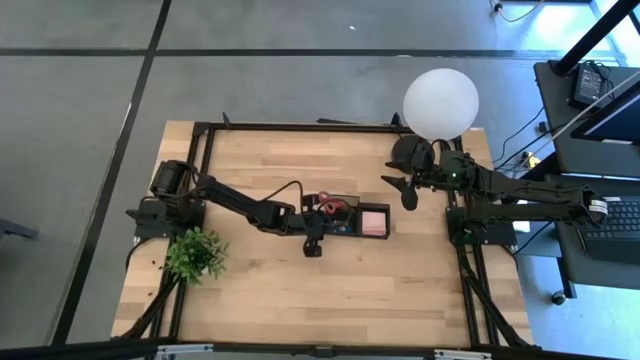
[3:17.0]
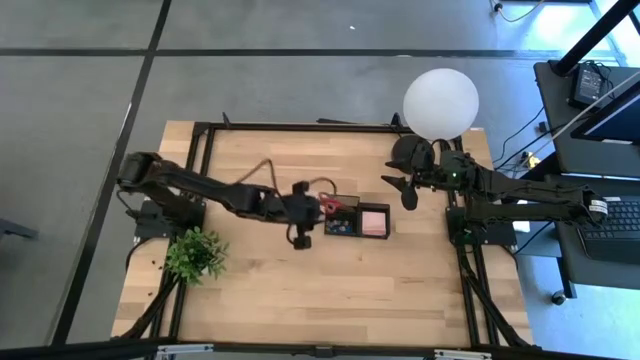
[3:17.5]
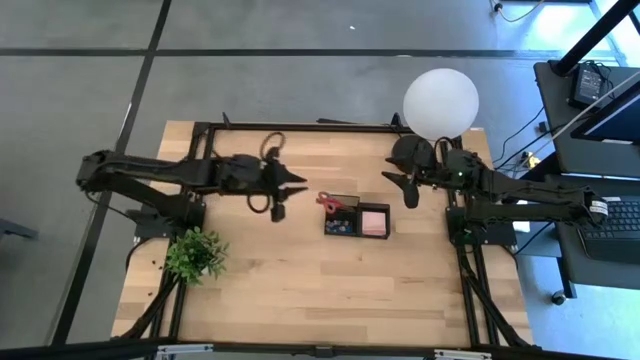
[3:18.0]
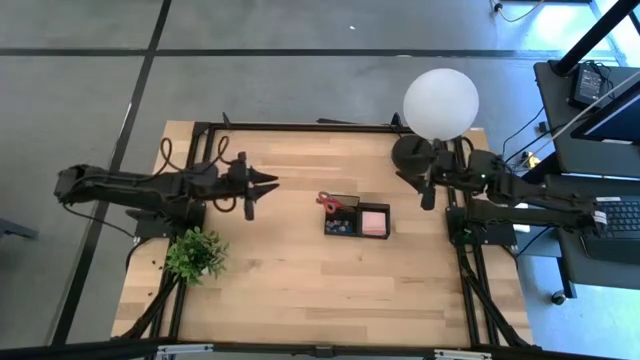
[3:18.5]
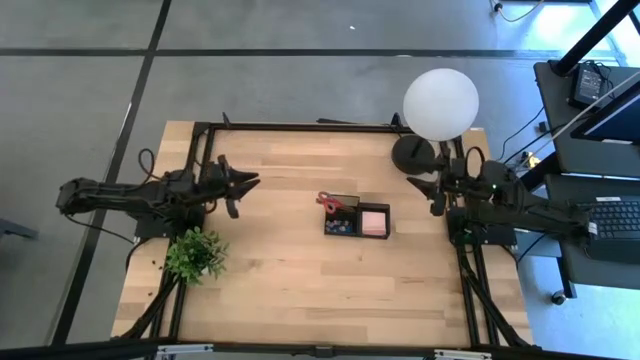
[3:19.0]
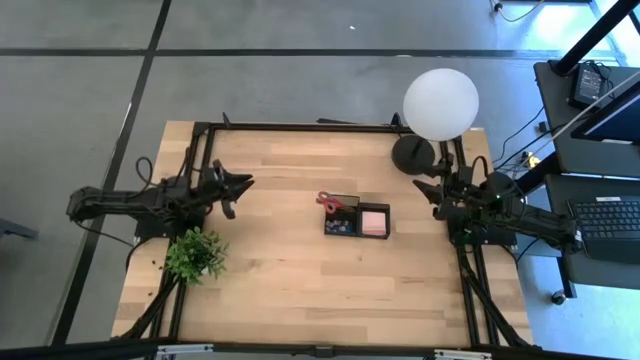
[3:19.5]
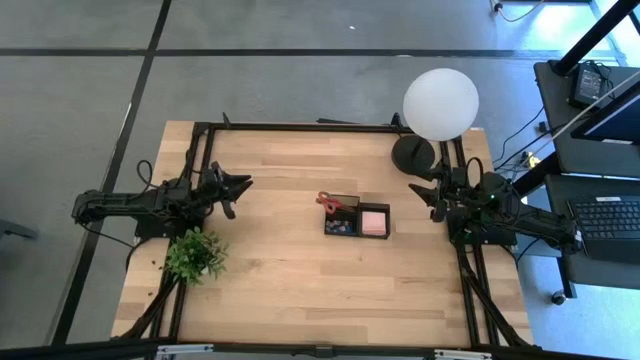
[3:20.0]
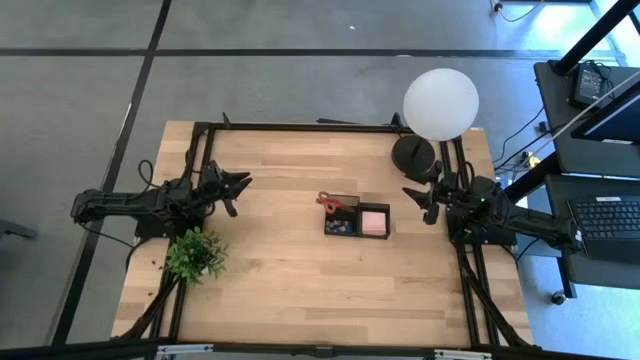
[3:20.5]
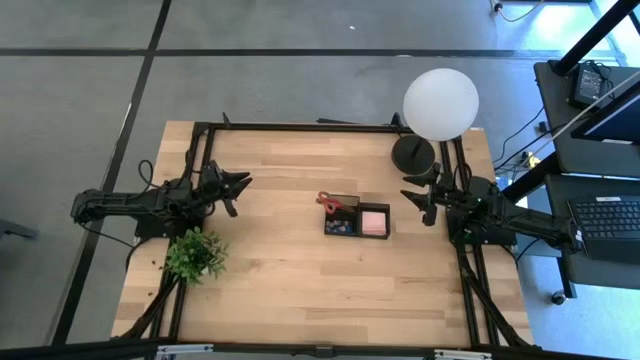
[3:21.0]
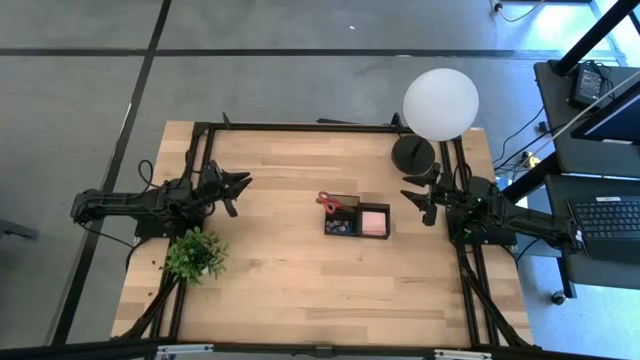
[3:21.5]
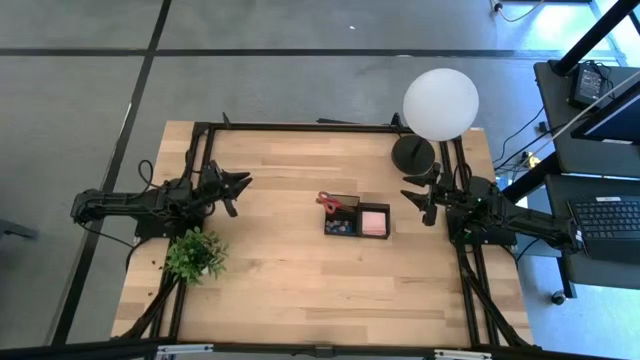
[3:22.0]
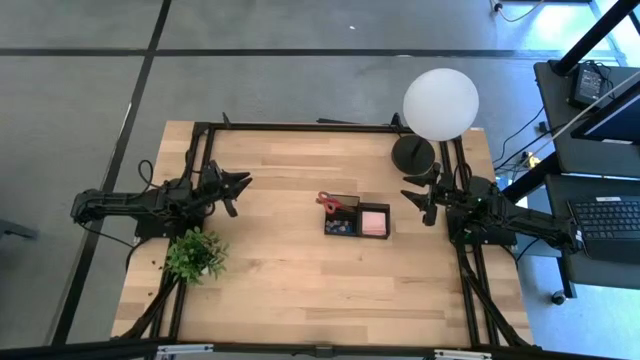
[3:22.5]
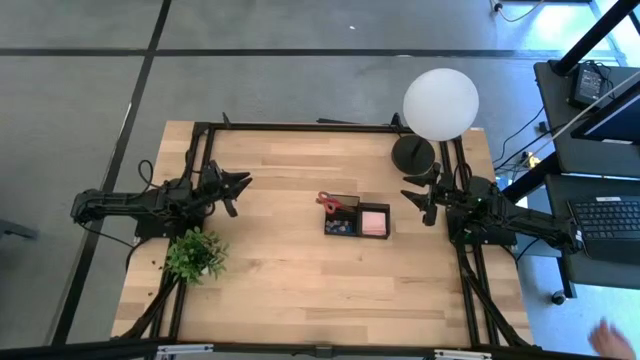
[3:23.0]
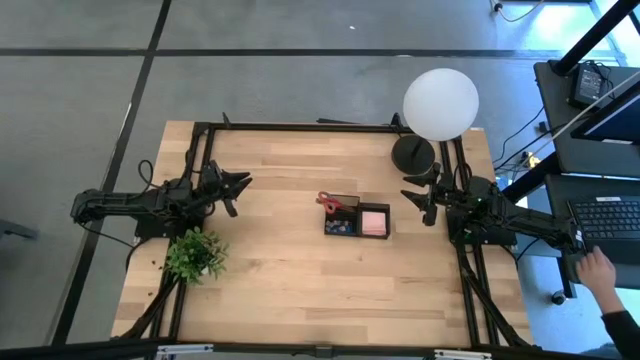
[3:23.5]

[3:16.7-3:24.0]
Task: Pick and place office supplies into organizer
Return to Home Position

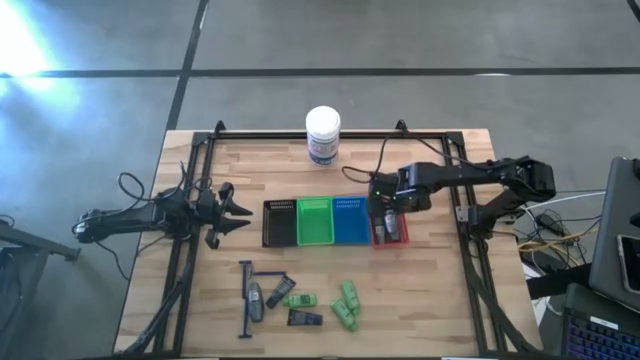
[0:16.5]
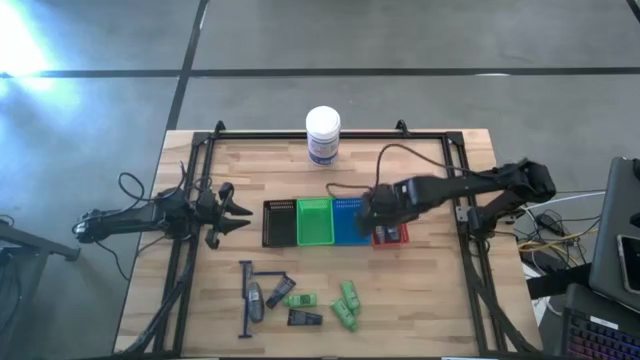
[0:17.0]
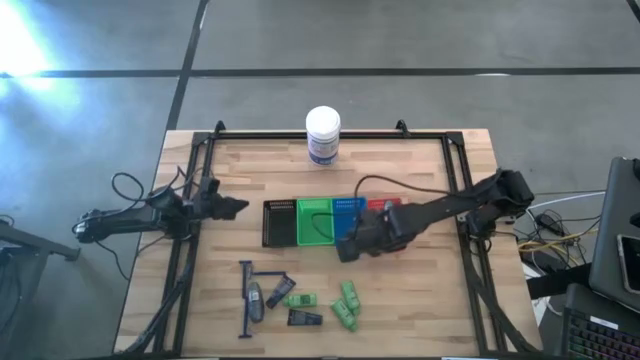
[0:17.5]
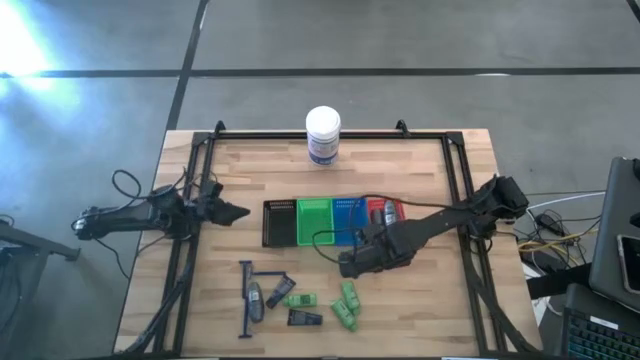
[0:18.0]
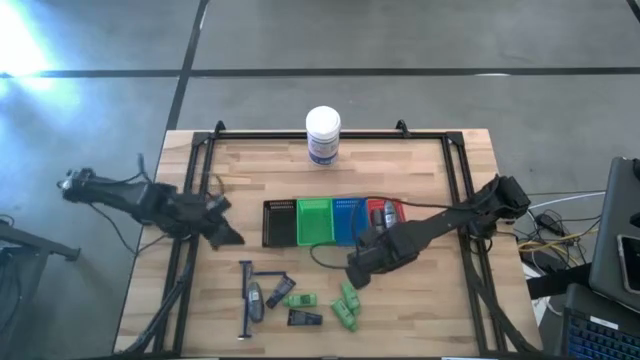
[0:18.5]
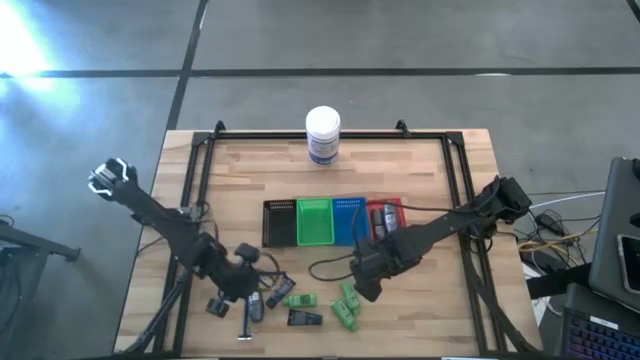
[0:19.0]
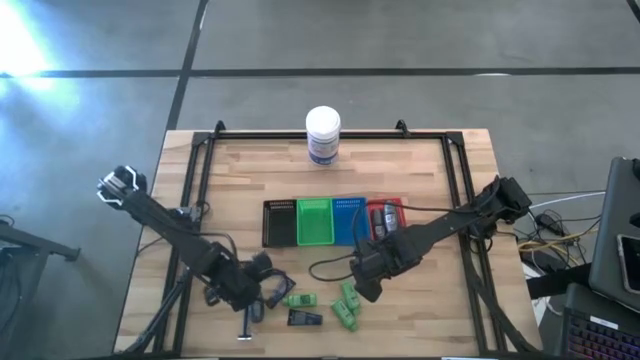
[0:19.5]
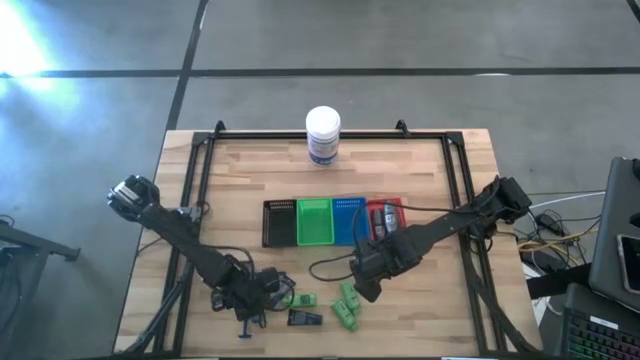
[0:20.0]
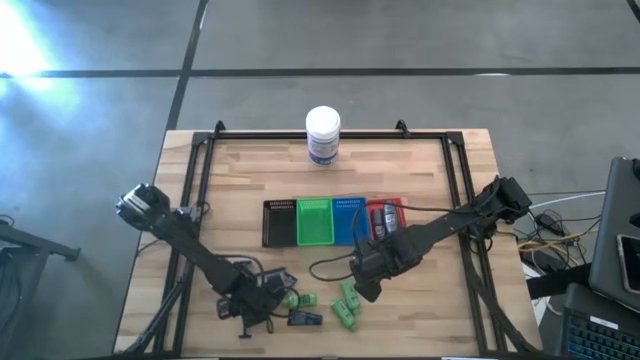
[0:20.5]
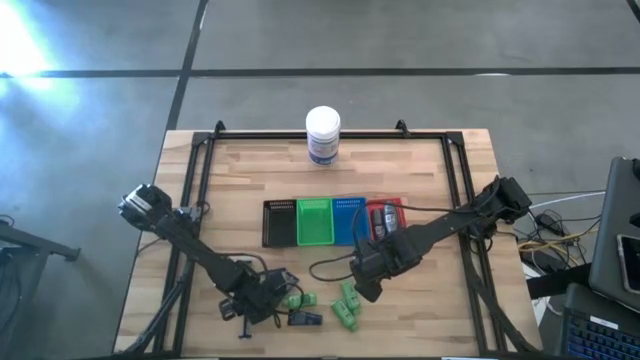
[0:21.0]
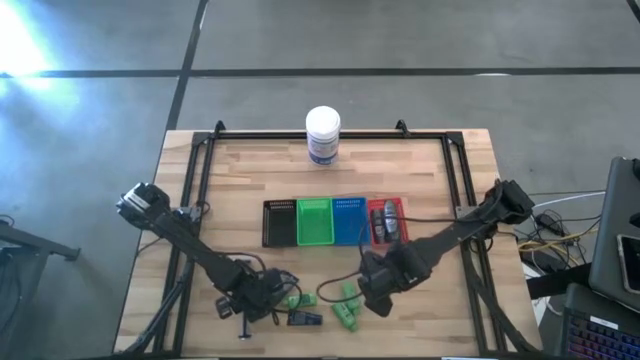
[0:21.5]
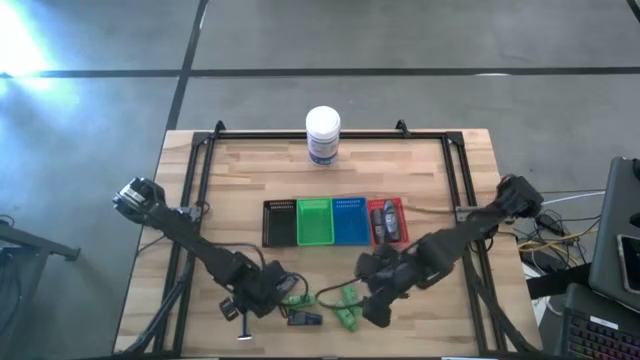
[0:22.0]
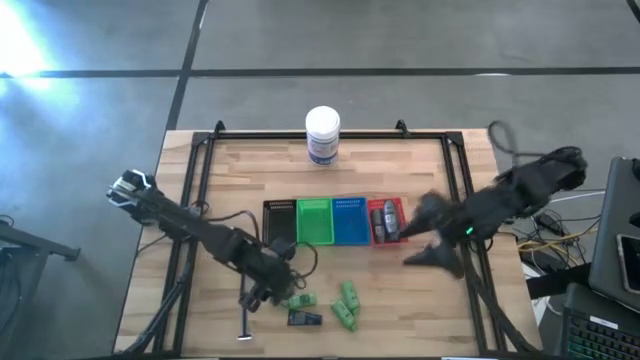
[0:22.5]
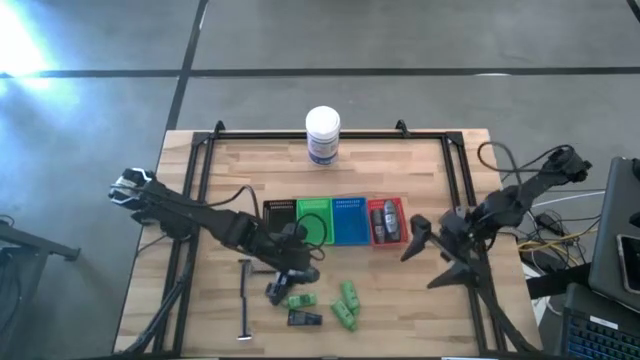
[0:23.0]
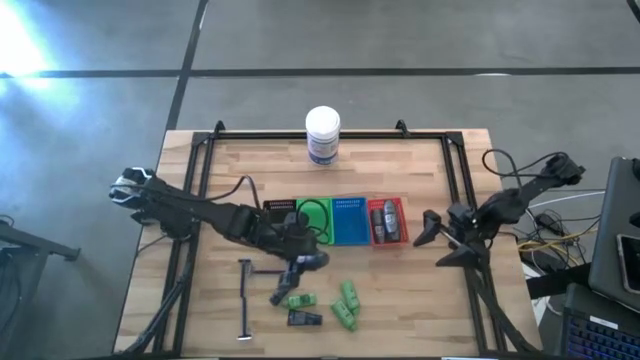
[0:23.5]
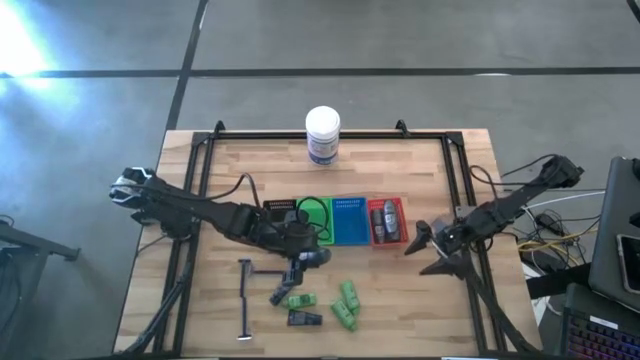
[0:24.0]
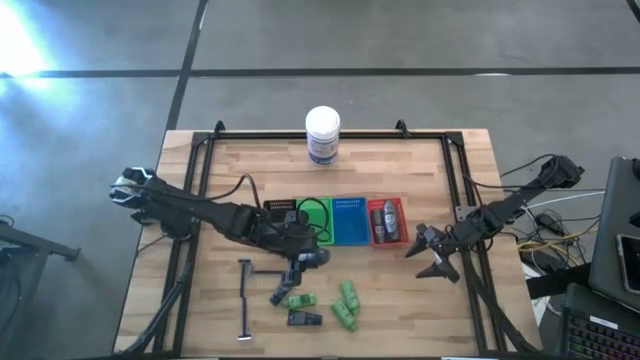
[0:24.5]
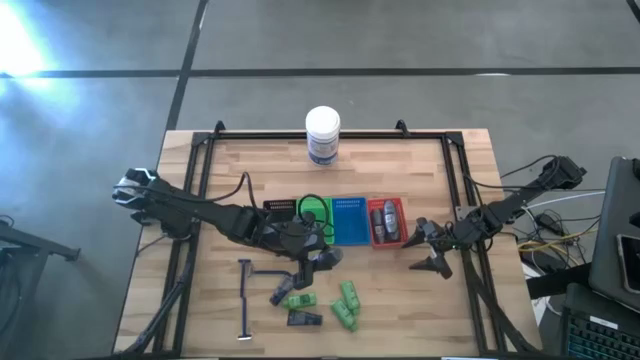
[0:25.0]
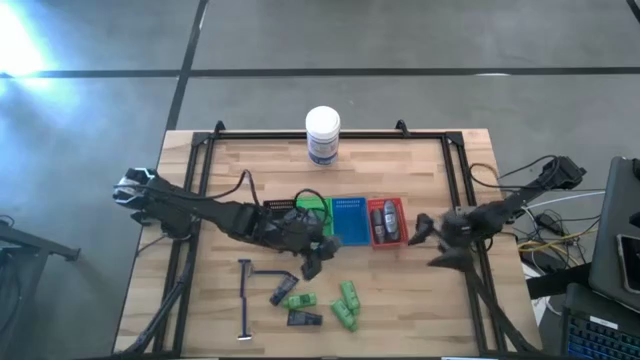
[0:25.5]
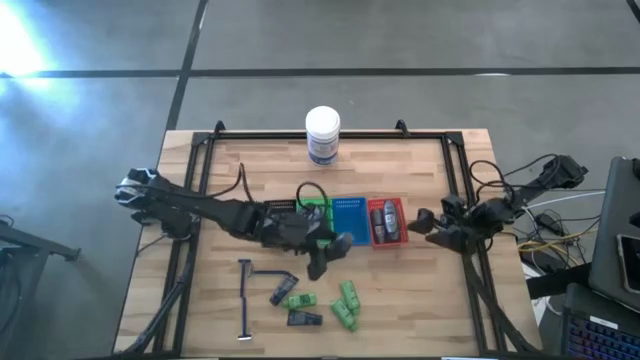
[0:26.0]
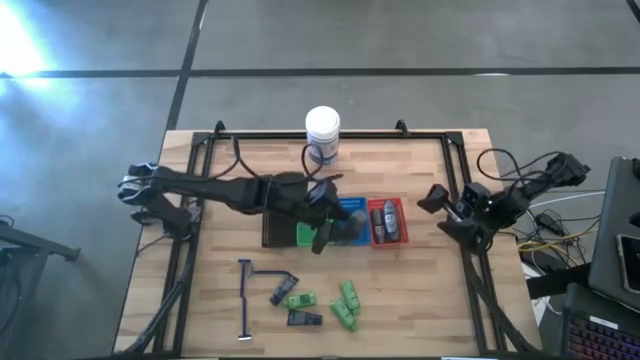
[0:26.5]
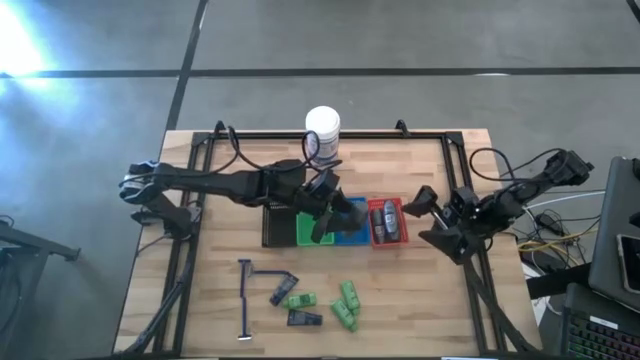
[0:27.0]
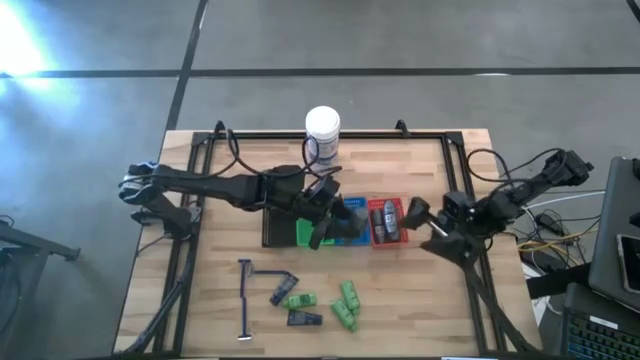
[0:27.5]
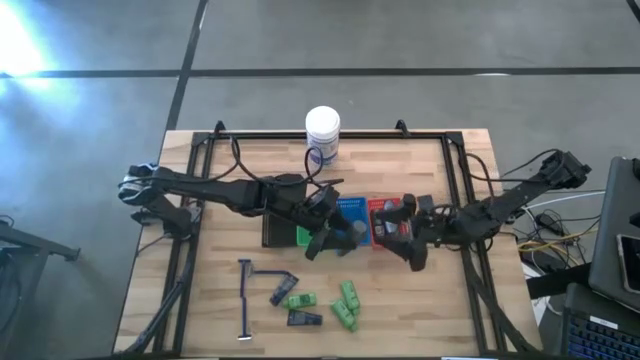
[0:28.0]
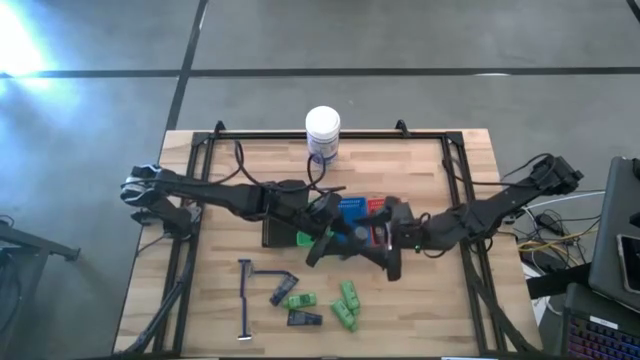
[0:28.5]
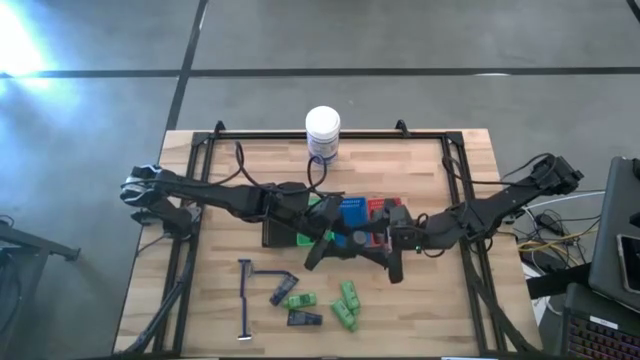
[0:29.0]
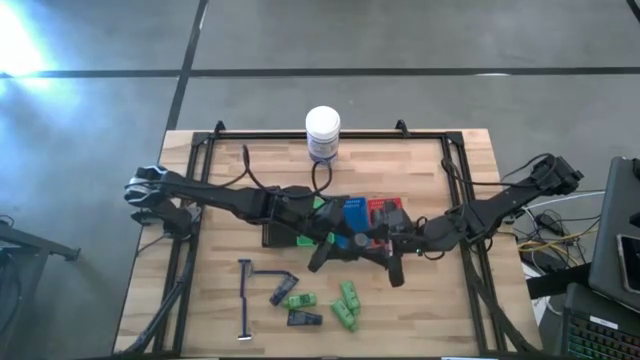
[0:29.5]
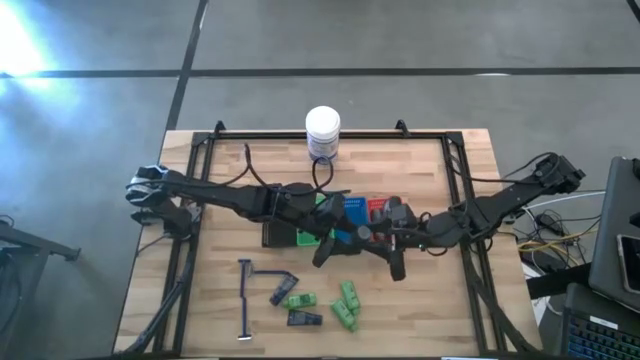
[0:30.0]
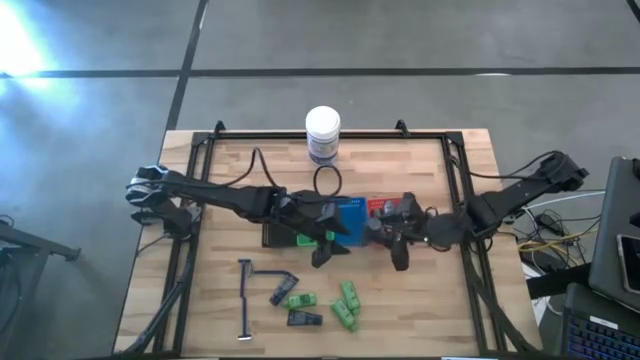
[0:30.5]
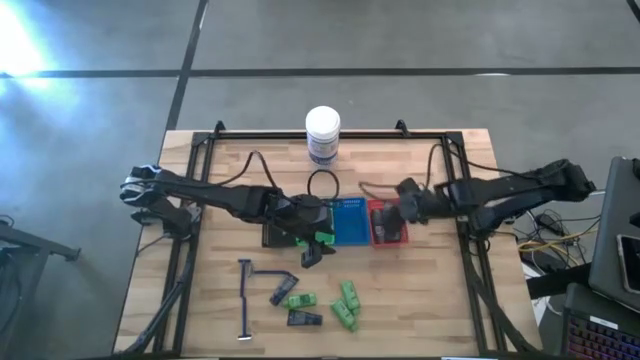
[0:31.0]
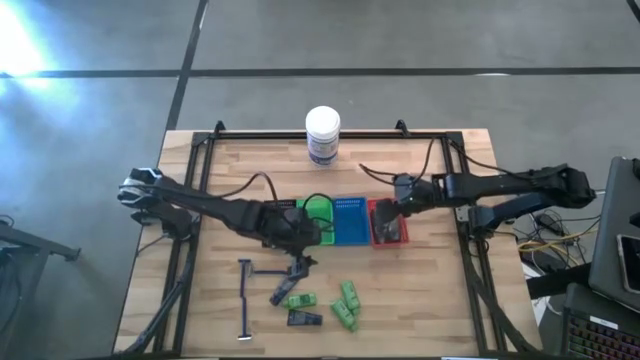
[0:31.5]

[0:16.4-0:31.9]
Task: Pick & Place Travel size toiletries
Put the black deodorant into the red bin
